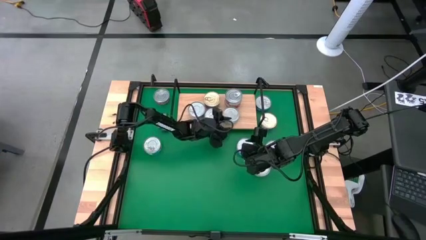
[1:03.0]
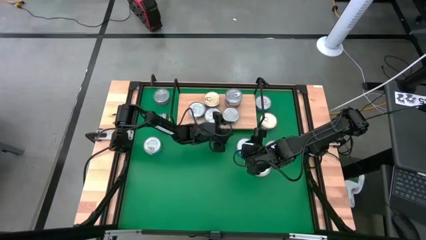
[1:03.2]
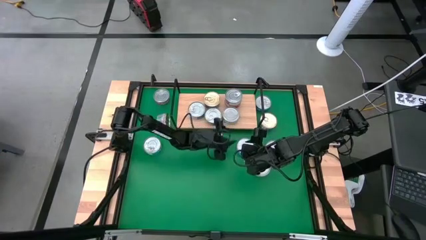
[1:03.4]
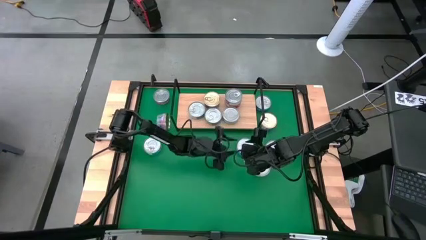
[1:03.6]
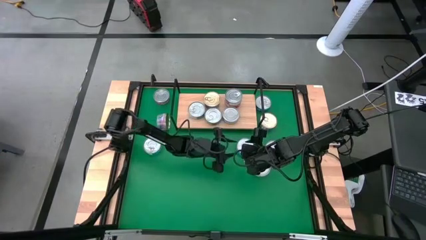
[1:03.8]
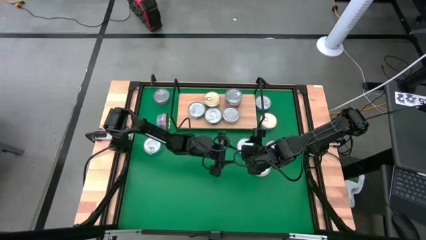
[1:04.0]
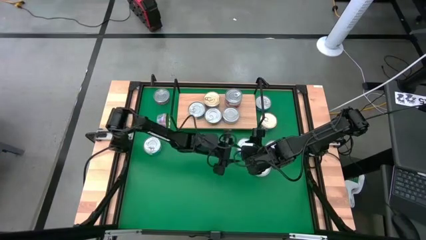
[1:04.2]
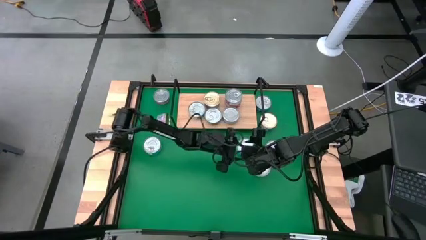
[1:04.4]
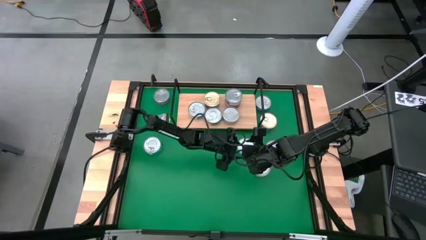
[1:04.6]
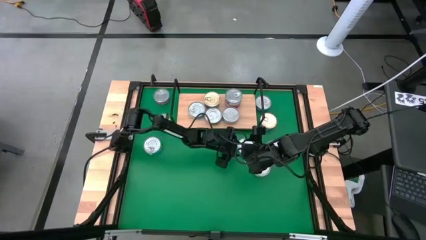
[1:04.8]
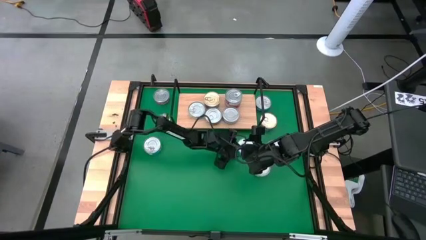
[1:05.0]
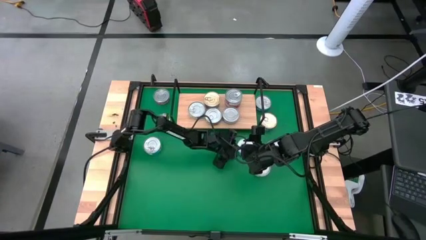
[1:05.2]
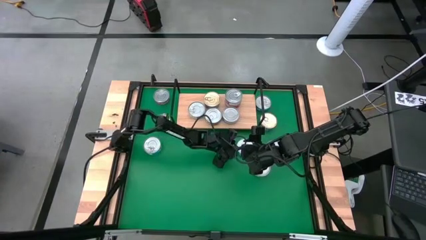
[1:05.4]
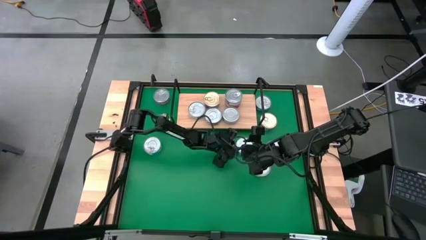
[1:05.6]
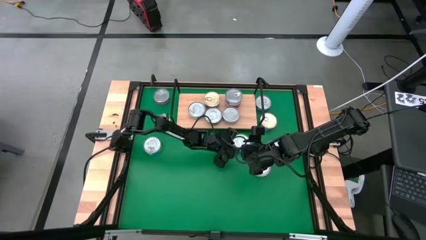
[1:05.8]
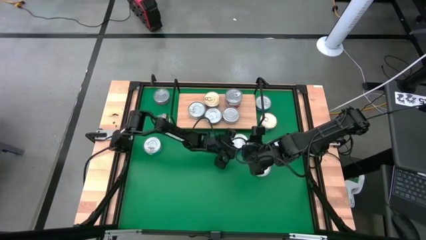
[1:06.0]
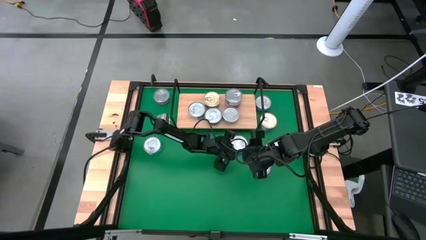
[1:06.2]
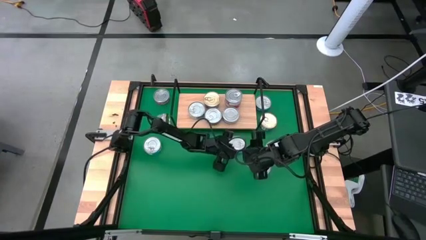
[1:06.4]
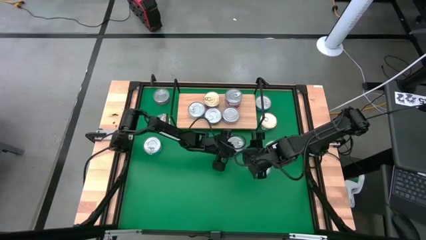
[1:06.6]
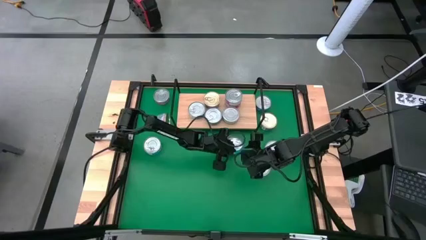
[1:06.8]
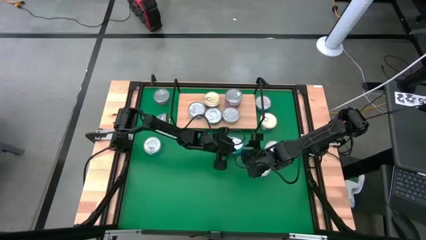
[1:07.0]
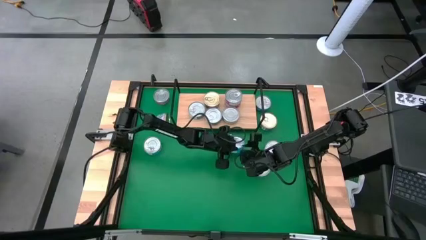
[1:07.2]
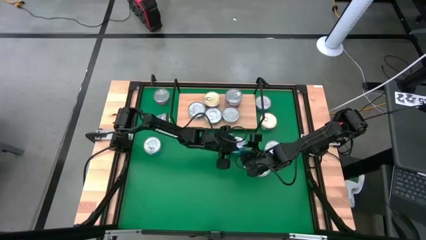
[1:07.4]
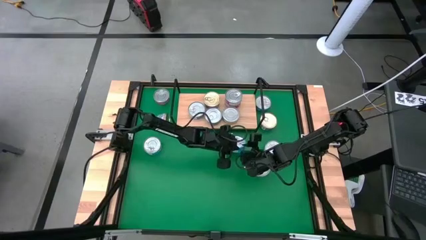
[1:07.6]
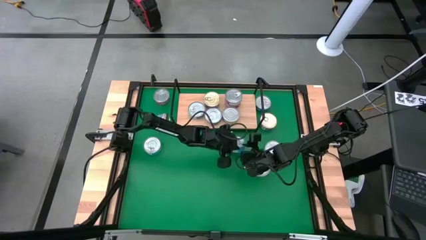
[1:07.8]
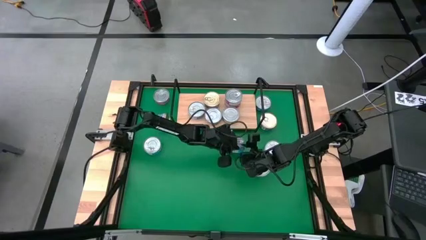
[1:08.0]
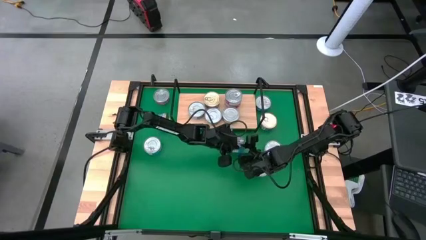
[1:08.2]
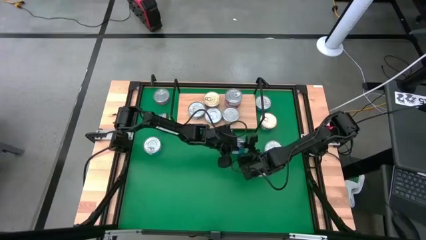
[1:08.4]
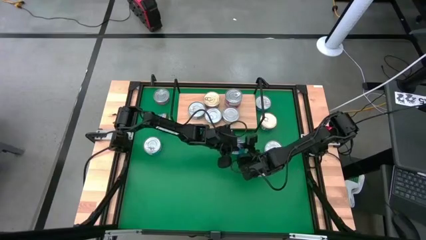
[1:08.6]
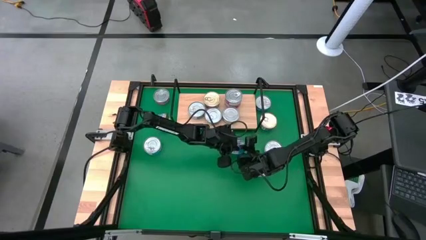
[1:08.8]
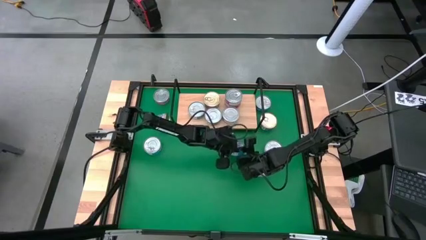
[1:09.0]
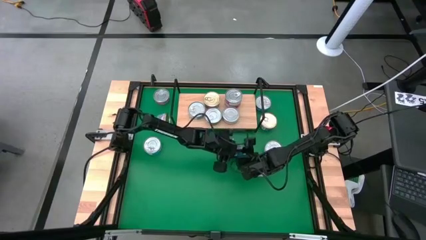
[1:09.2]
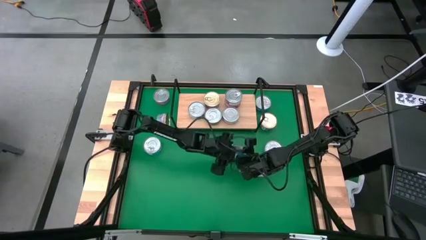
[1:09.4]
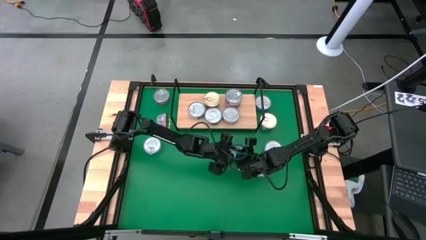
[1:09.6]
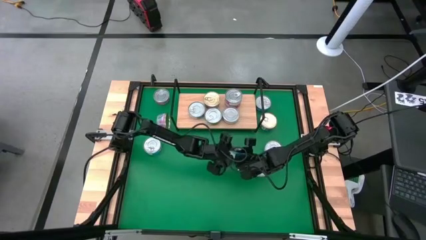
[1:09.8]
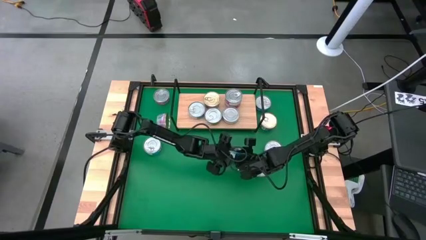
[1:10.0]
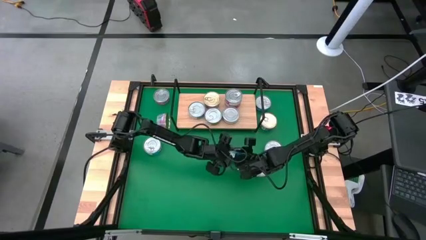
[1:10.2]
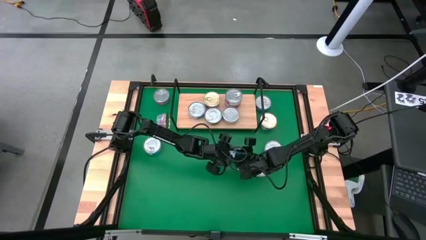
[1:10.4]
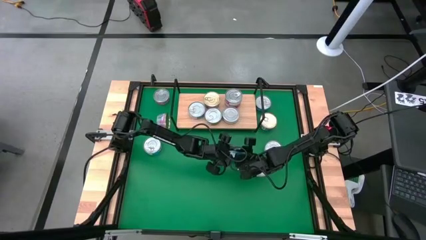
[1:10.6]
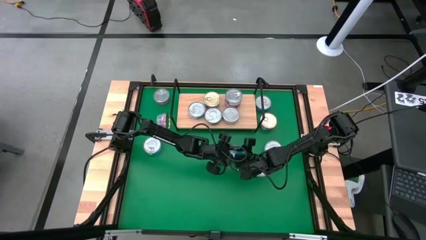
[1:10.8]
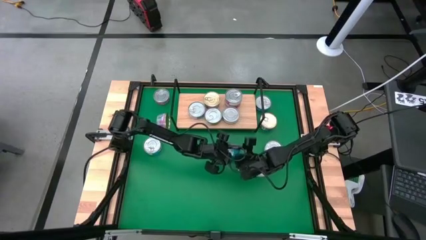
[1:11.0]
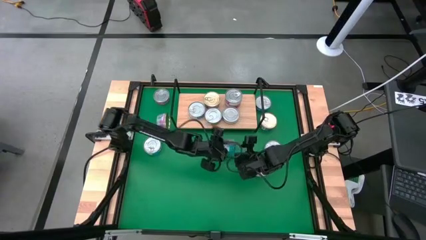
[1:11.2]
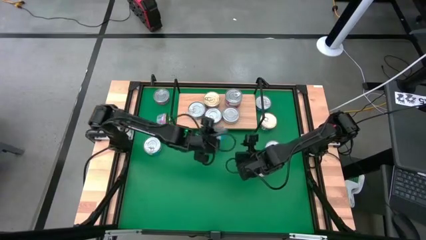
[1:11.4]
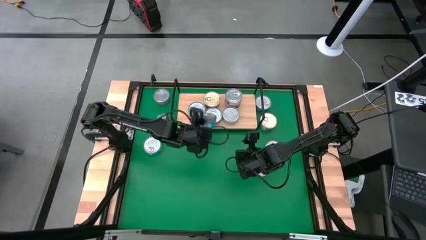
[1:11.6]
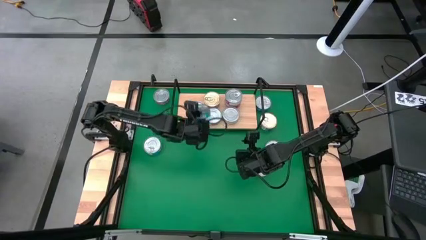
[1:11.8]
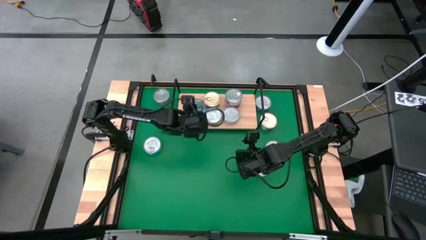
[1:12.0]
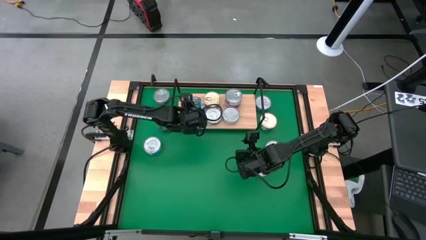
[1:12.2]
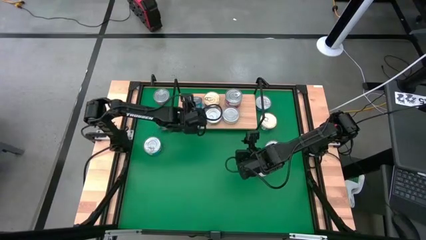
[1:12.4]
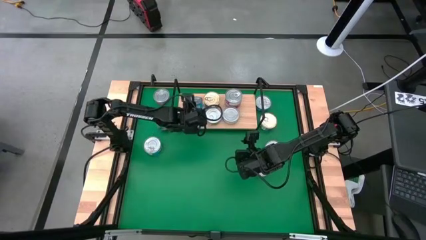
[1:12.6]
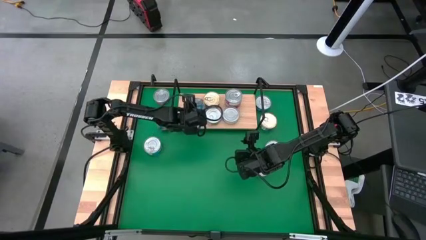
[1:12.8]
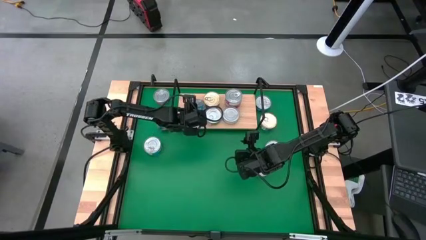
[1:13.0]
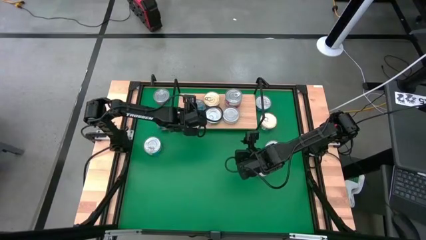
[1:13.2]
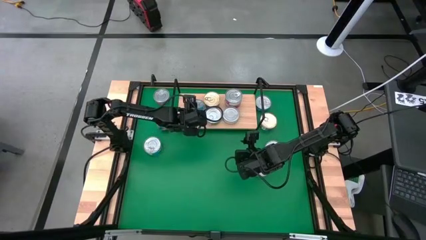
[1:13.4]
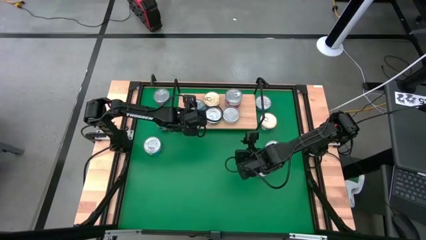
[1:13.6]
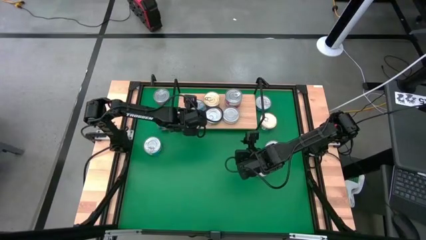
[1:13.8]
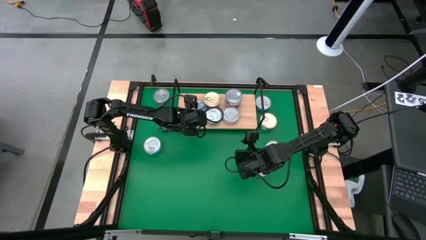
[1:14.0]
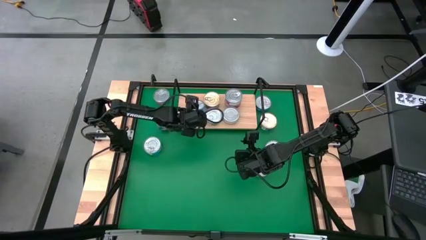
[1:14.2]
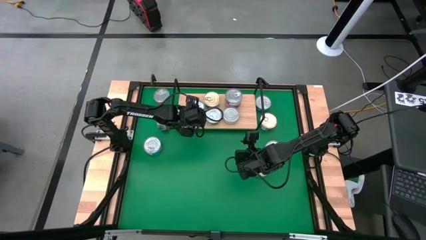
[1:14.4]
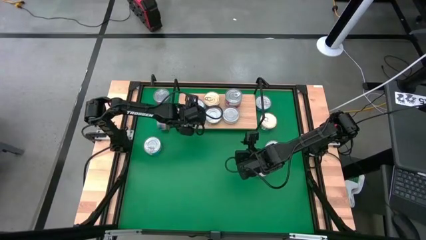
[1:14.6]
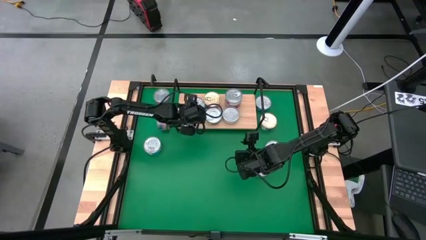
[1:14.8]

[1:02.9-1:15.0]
Task: Stack canned seafood by type on shelf
Stack the yellow blue tuna can on top of the yellow blue tuna can on the shelf
